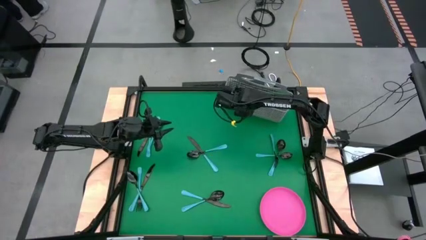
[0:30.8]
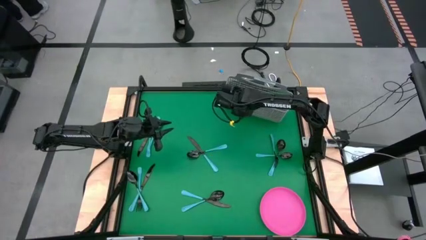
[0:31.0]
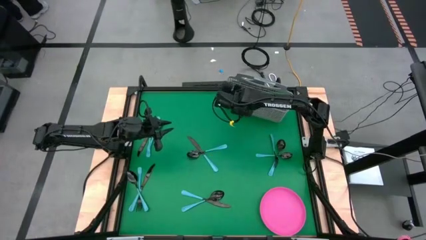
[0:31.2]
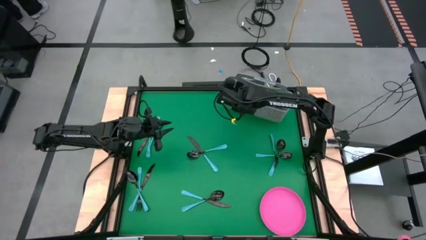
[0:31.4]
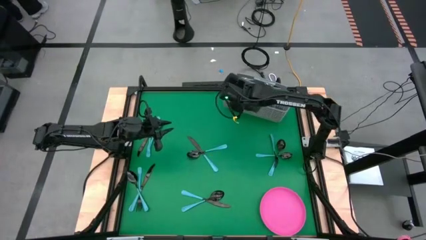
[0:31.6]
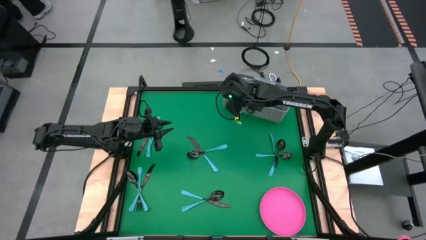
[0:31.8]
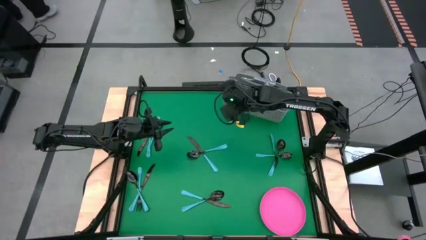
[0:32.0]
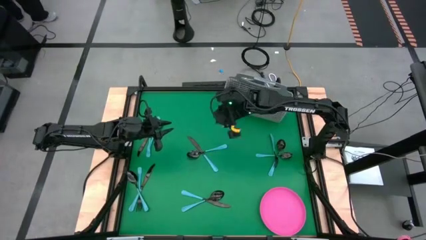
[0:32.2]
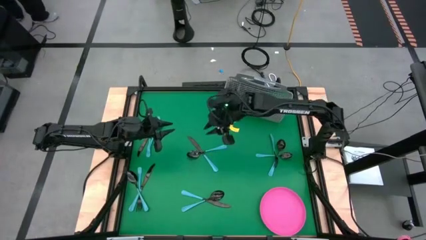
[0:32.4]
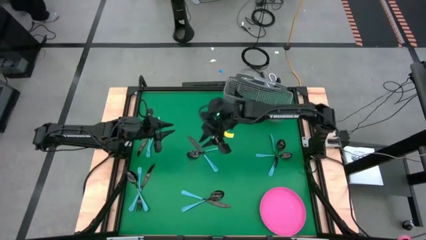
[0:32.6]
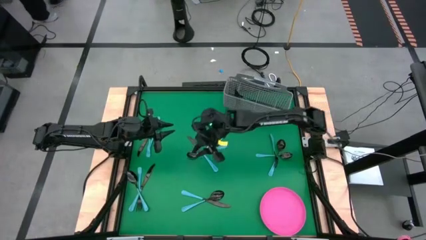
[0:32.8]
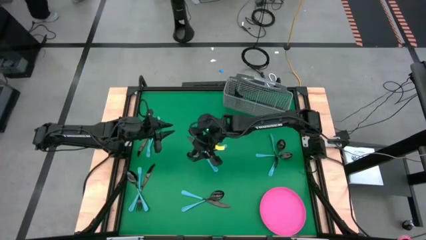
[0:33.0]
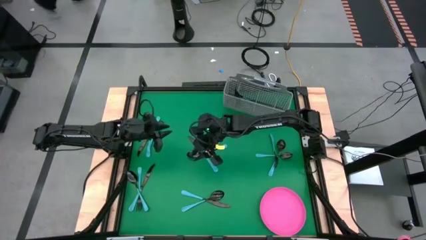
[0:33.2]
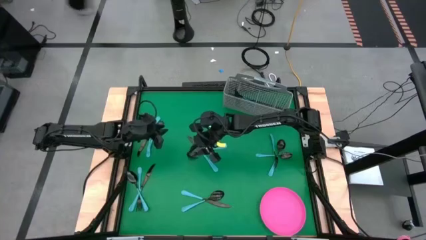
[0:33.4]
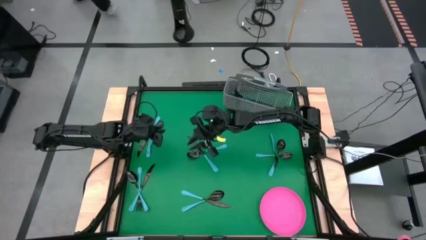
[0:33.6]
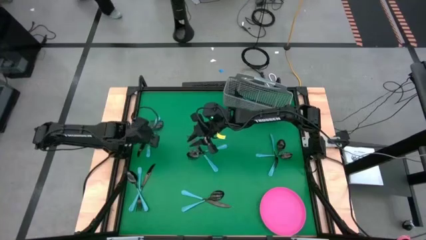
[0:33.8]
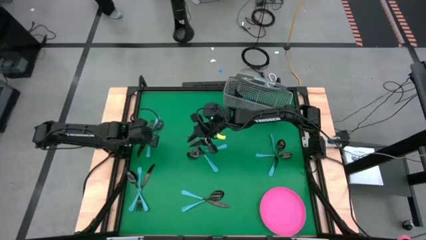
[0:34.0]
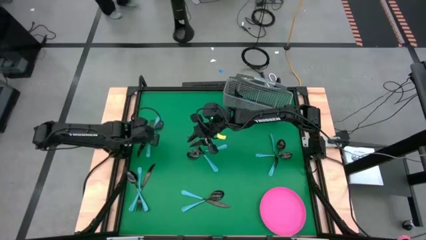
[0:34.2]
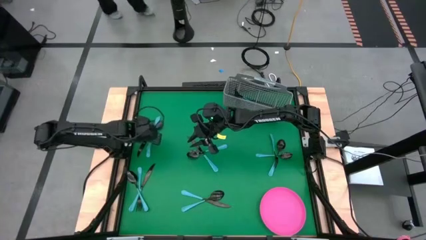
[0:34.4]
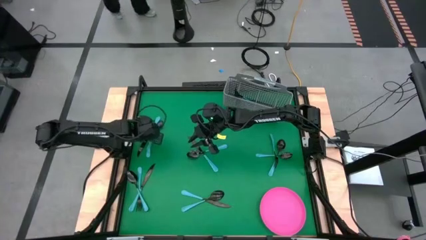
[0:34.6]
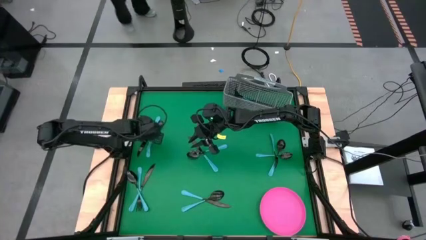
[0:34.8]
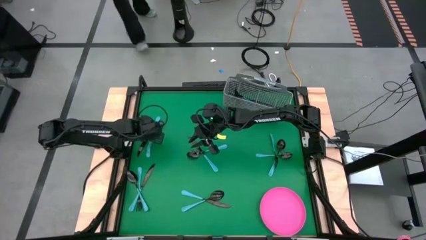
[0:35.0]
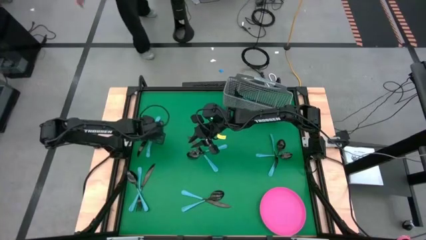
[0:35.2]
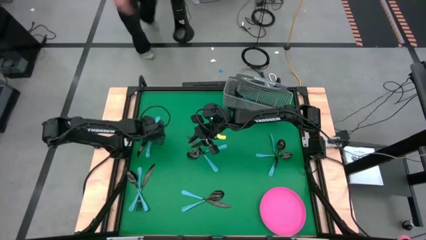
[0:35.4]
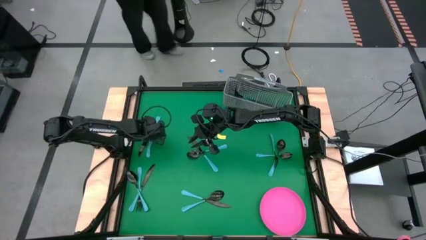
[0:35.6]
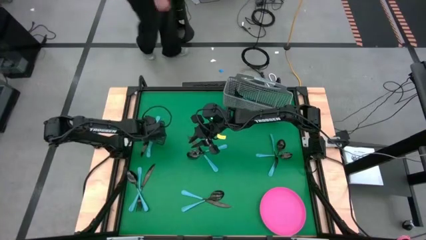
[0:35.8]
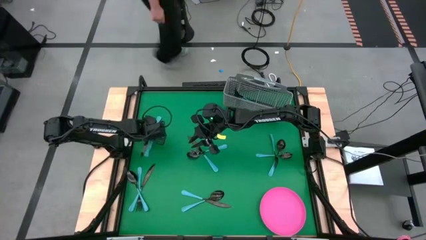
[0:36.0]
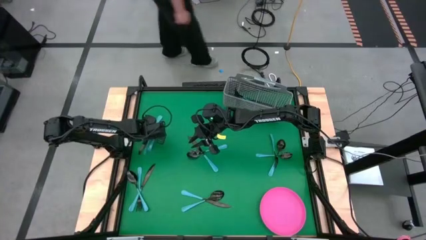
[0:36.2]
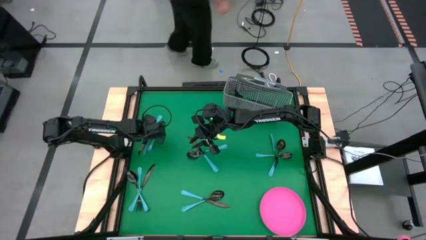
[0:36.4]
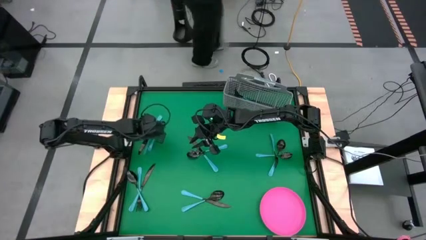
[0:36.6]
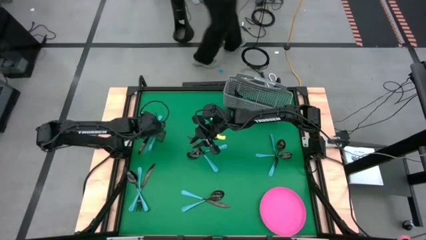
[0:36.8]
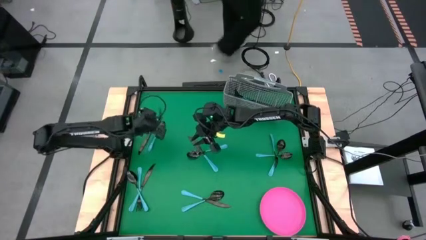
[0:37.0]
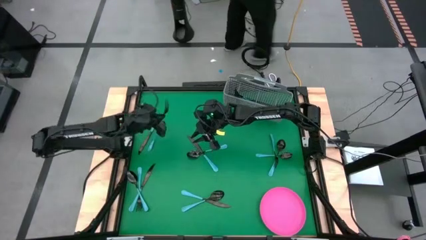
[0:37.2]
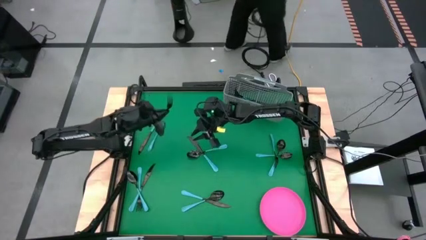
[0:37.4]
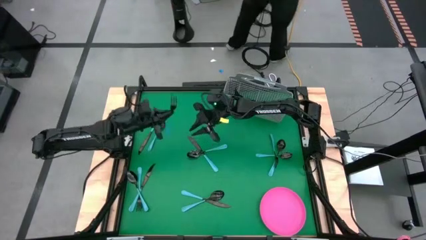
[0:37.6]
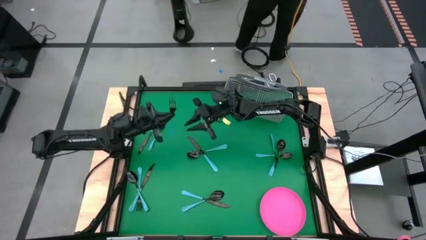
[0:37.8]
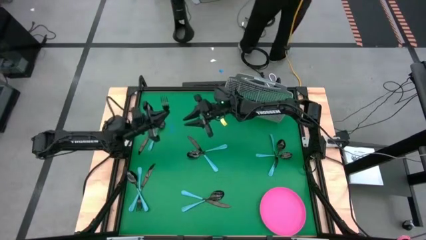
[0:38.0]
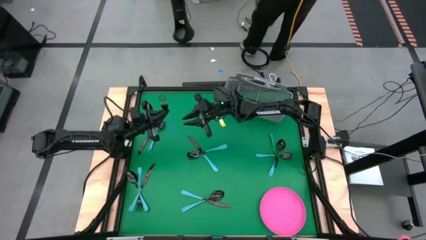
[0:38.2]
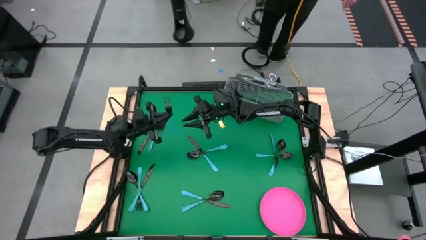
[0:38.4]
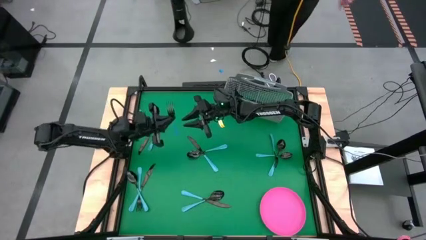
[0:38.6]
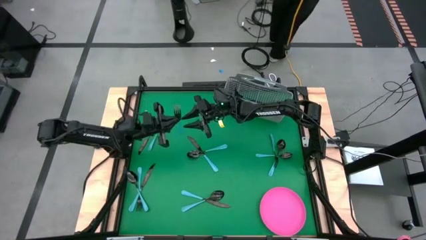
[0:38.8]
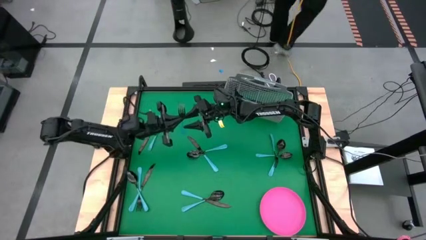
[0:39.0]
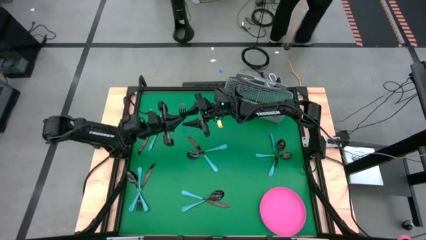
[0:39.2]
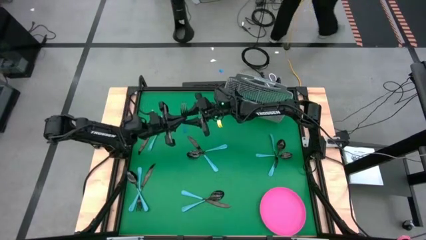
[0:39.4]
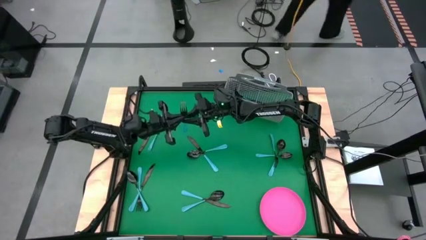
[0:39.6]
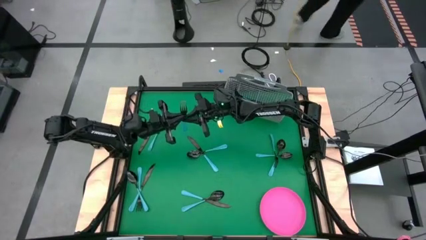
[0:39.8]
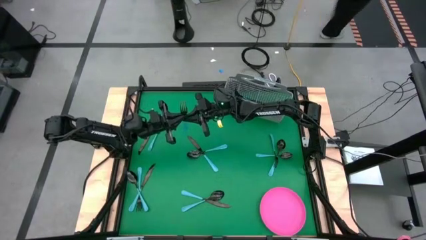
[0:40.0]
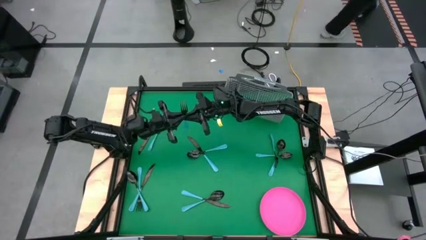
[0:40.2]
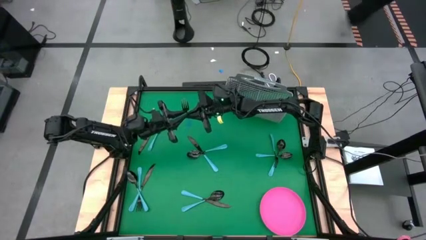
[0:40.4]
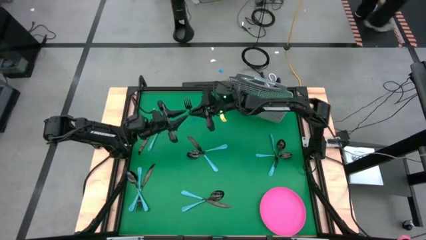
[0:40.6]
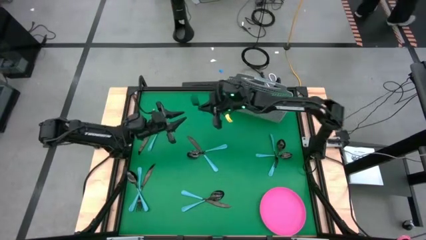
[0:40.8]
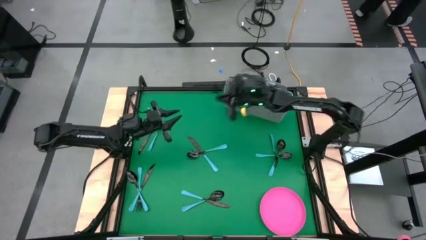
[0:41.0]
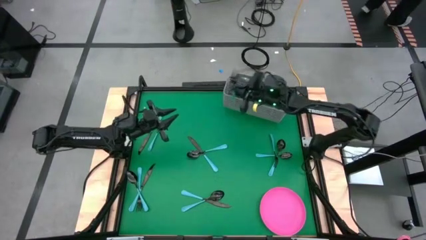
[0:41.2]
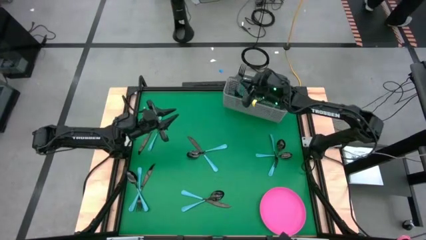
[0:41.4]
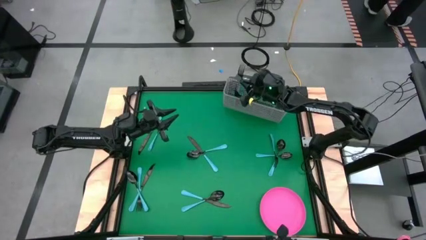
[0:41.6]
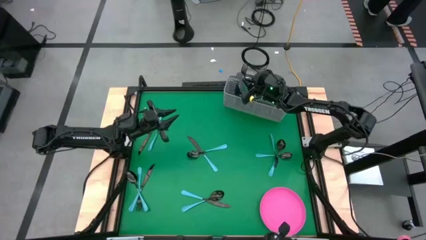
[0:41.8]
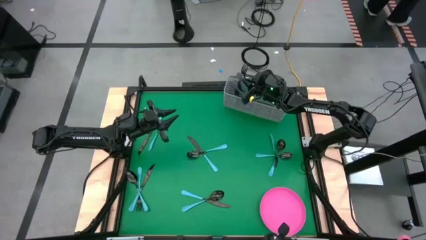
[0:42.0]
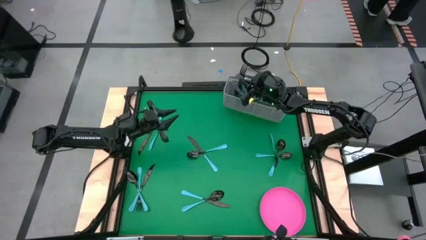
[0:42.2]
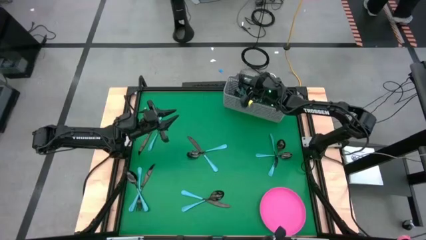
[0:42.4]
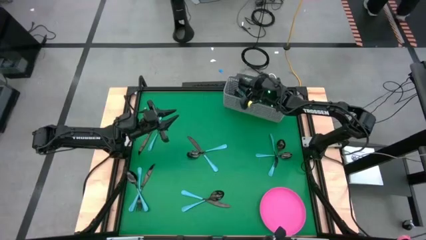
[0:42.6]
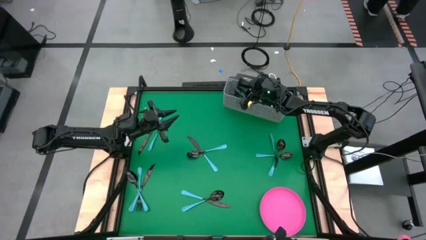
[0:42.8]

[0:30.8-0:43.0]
Task: Sort silverware
Put the blue fork into the silverware basket

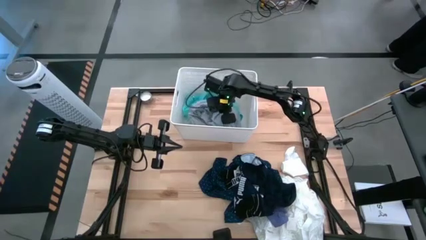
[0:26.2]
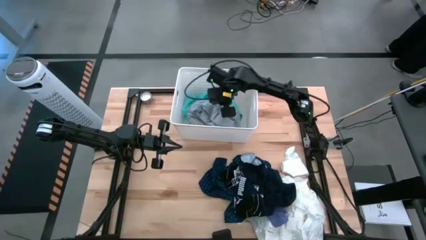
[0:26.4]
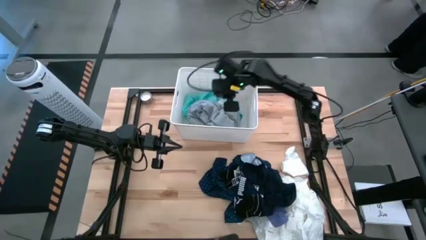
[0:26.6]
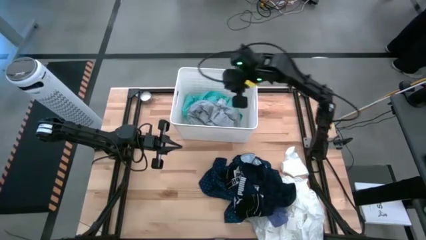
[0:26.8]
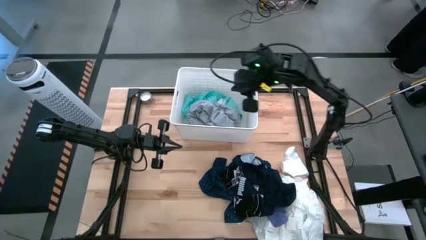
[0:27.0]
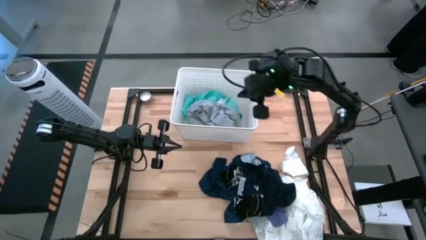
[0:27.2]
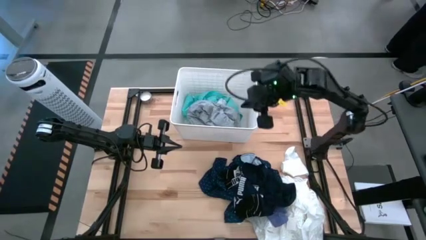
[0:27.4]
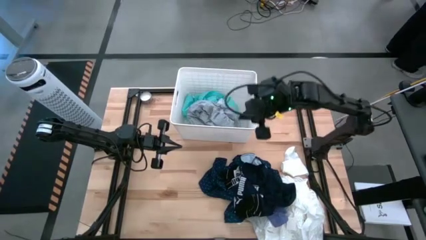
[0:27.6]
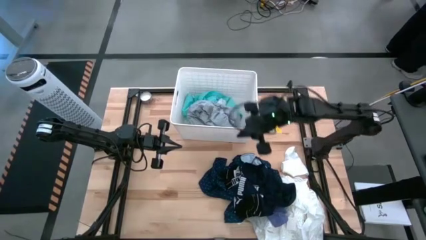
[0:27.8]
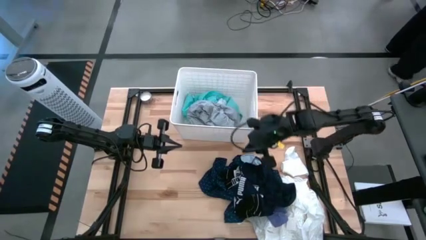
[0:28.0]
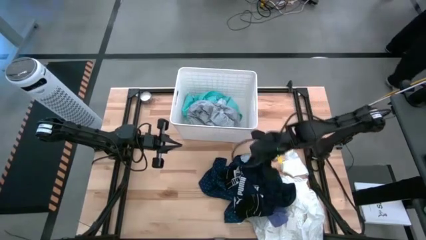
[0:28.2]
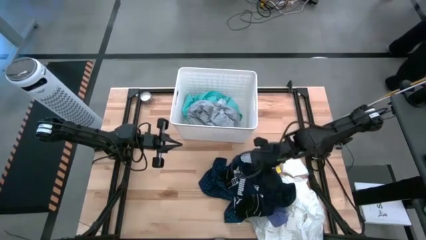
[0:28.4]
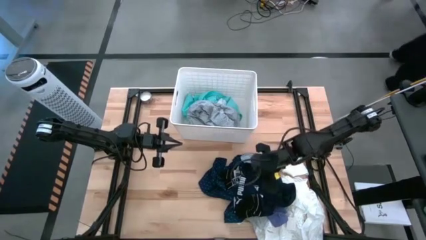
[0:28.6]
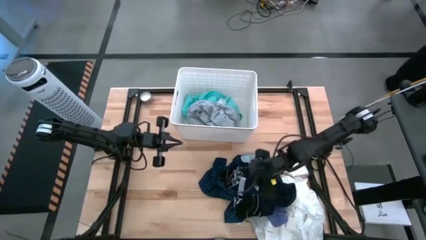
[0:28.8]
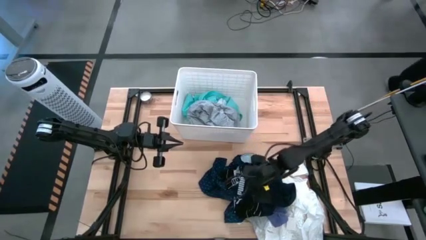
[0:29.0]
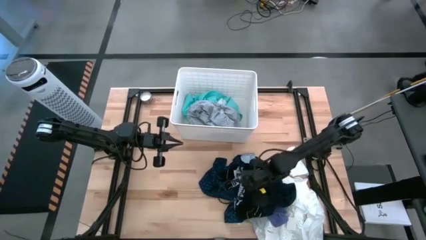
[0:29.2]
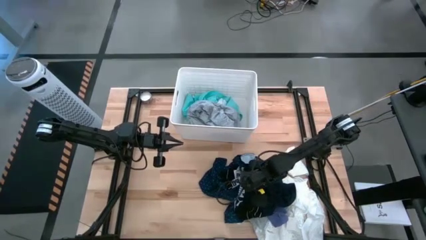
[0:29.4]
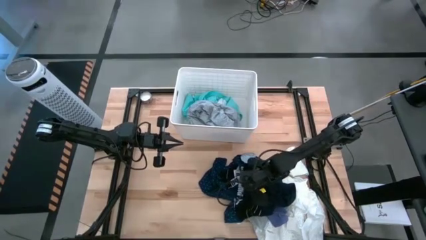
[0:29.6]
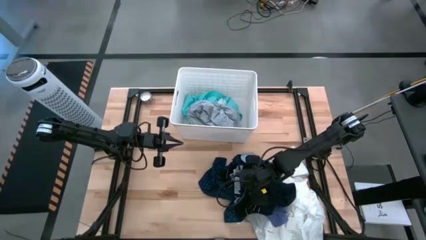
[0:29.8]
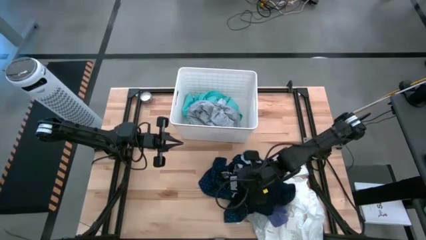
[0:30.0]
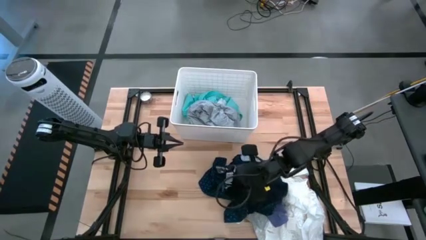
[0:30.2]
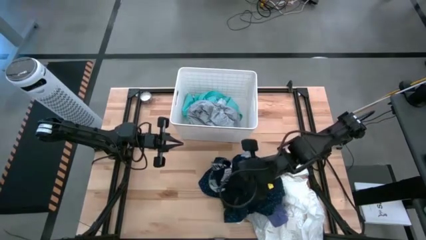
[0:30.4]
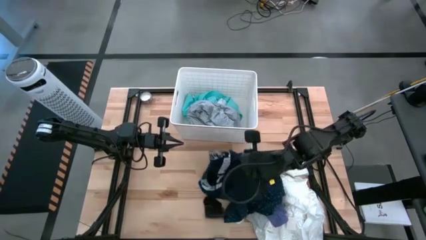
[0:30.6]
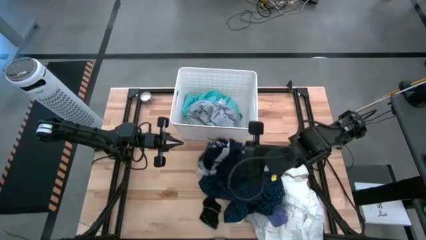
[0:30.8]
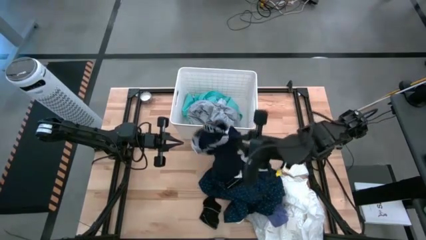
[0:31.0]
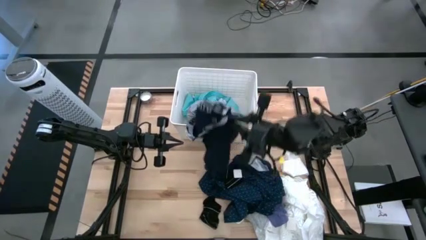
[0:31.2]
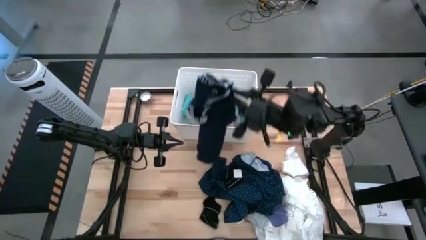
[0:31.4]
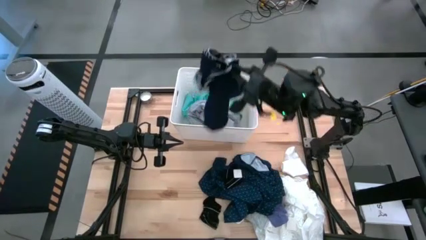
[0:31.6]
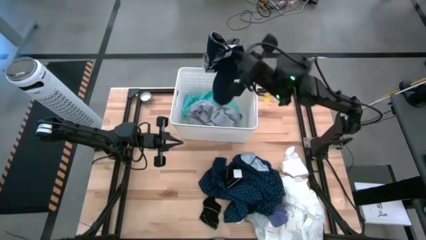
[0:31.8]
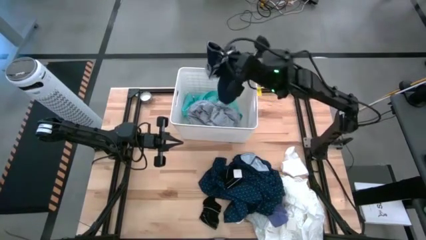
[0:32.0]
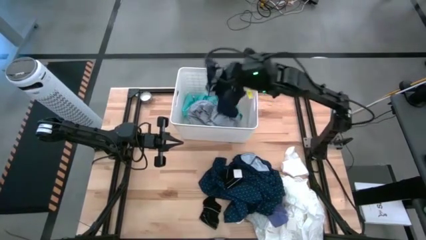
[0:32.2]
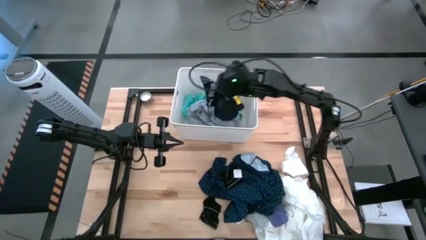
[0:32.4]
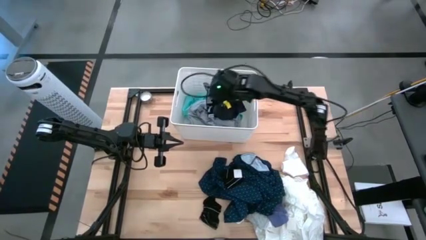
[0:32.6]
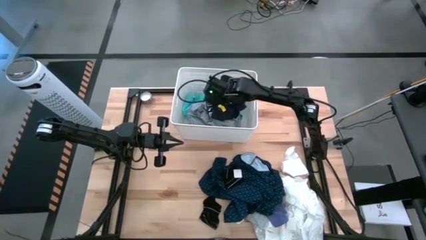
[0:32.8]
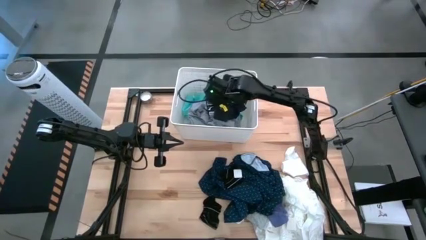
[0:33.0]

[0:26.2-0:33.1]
Task: Sort clothes
Put the blue underwear into the laundry organizer
